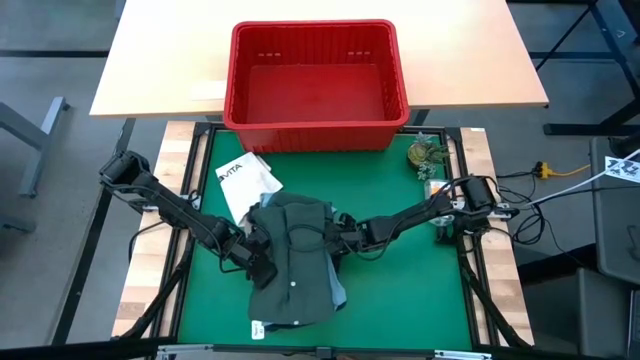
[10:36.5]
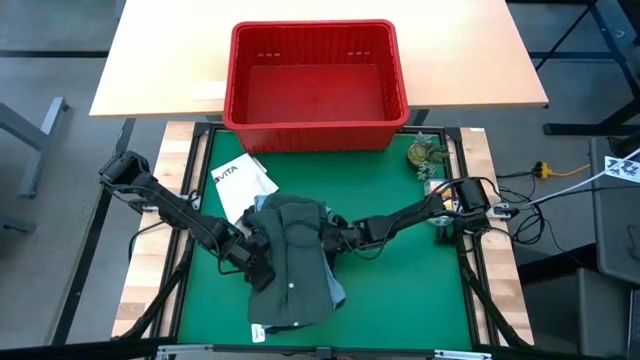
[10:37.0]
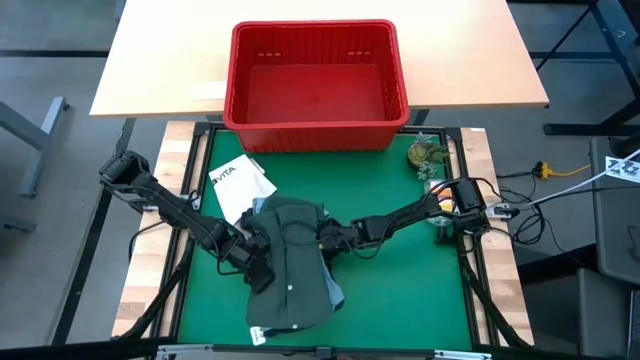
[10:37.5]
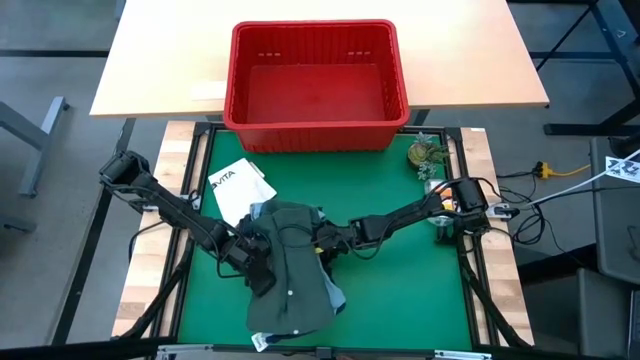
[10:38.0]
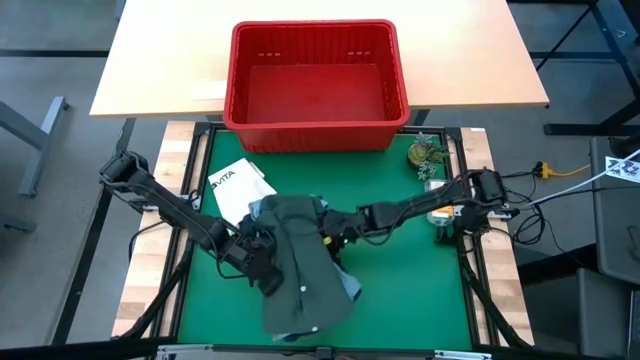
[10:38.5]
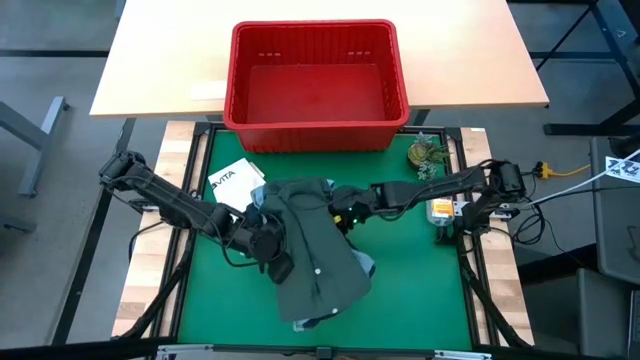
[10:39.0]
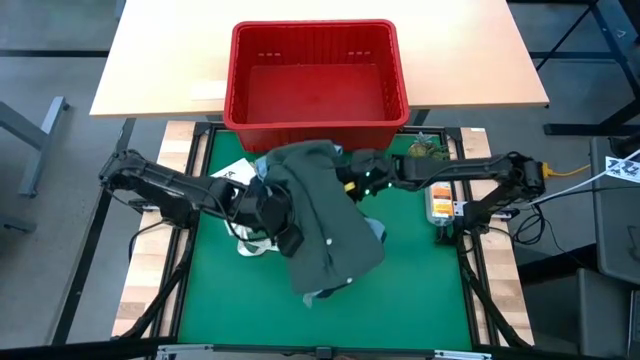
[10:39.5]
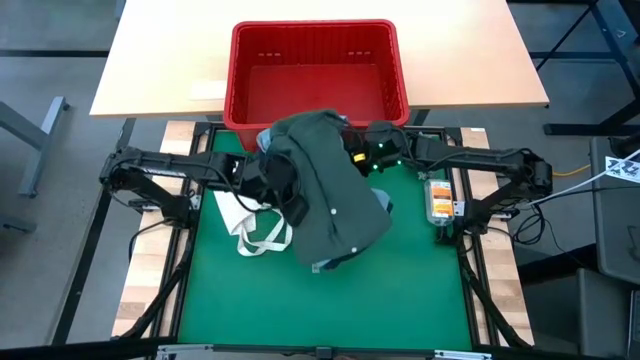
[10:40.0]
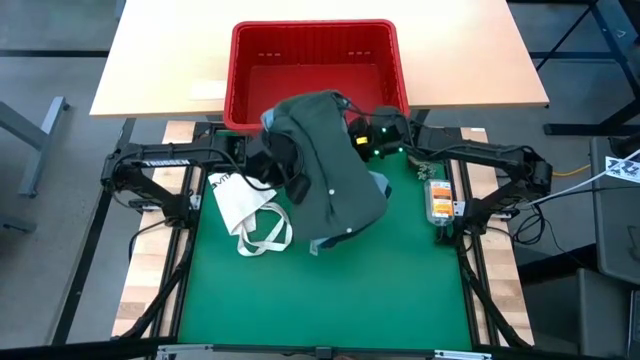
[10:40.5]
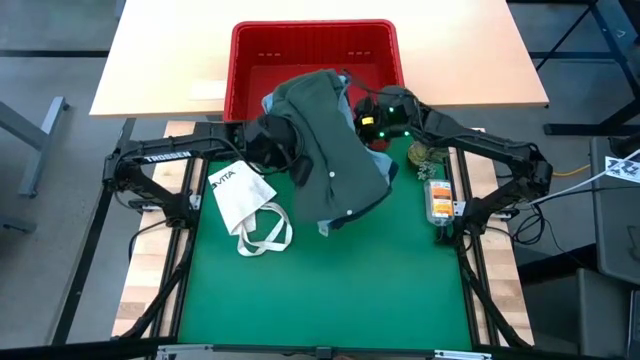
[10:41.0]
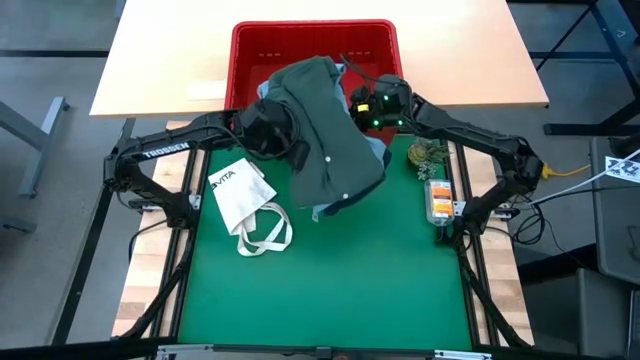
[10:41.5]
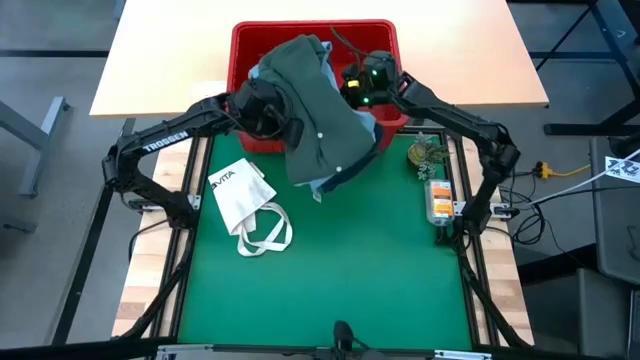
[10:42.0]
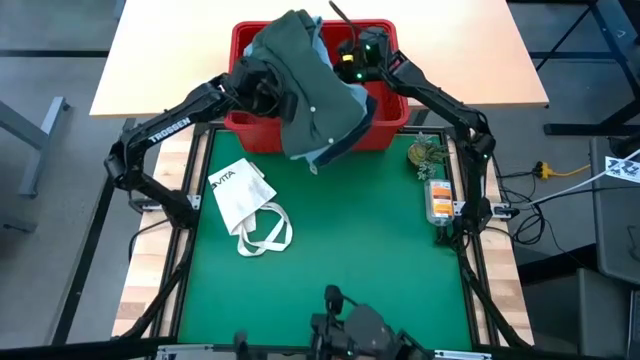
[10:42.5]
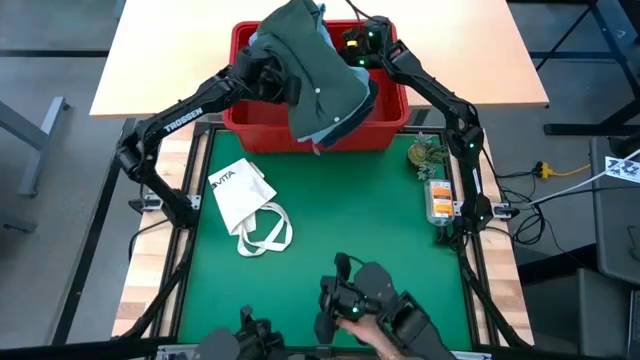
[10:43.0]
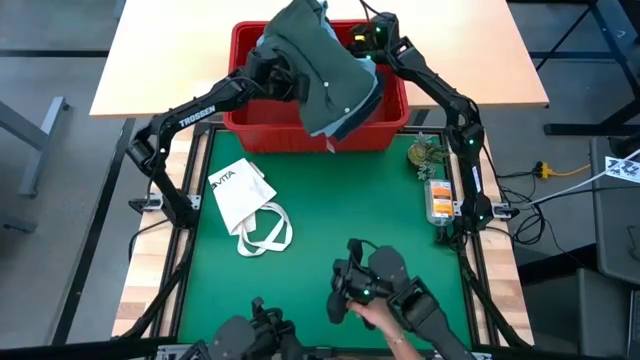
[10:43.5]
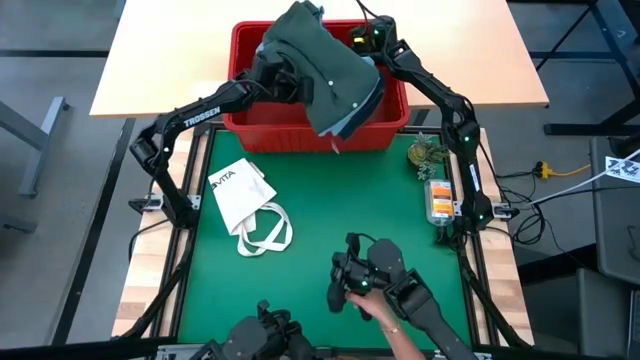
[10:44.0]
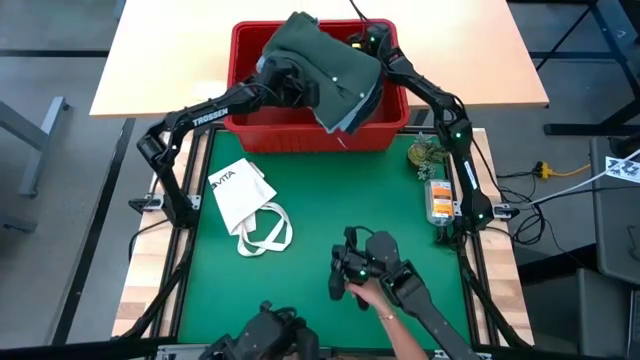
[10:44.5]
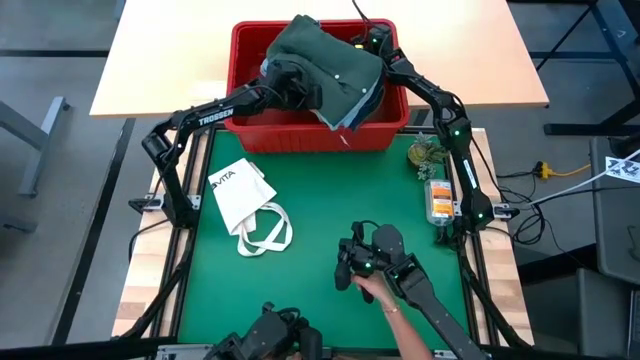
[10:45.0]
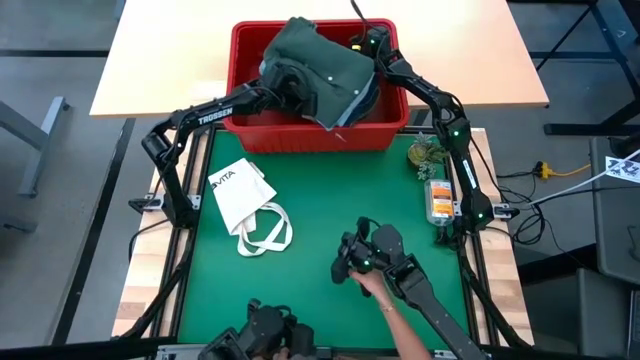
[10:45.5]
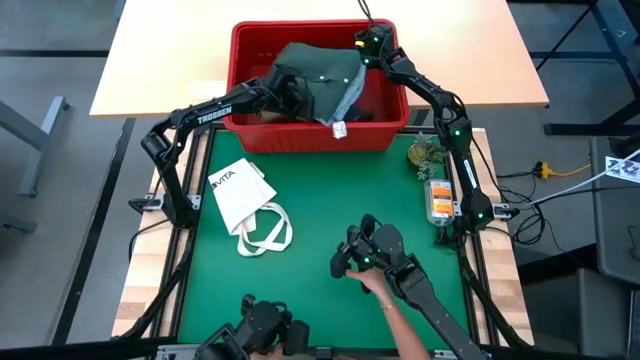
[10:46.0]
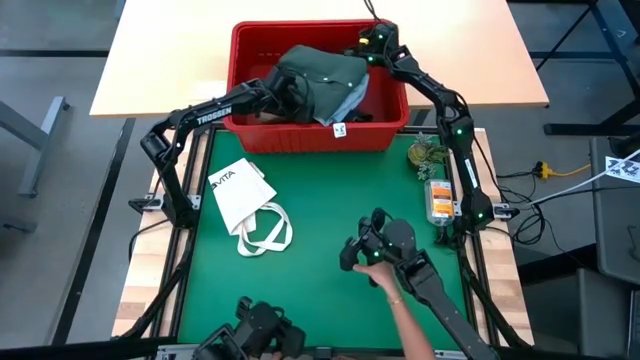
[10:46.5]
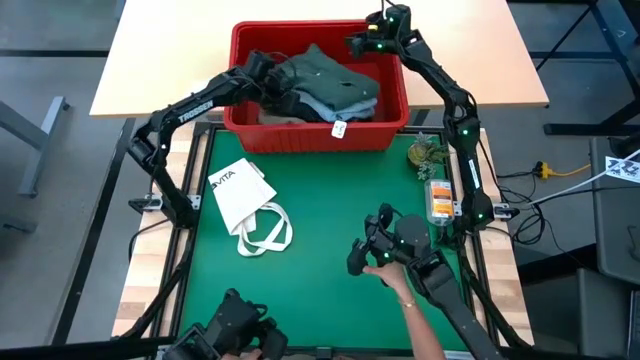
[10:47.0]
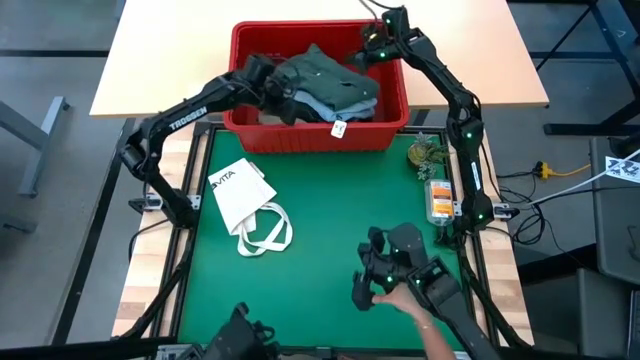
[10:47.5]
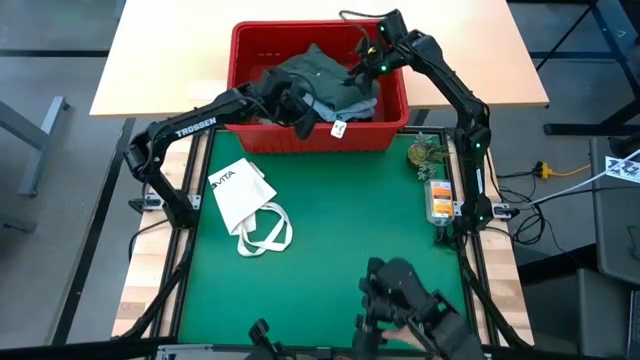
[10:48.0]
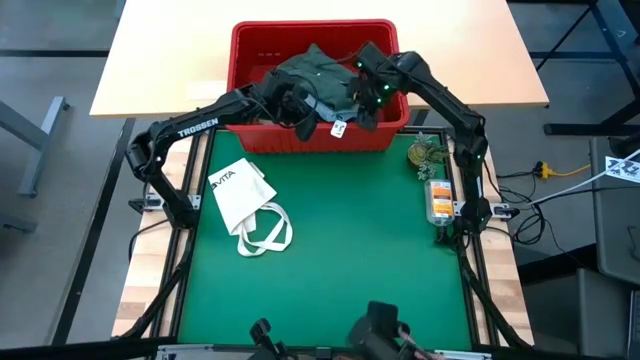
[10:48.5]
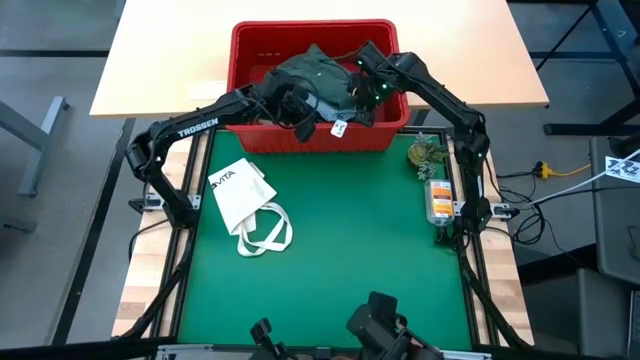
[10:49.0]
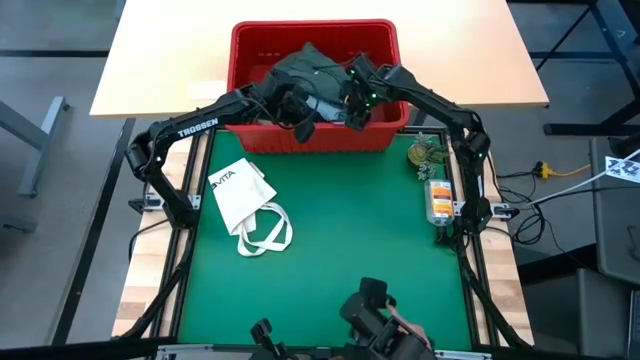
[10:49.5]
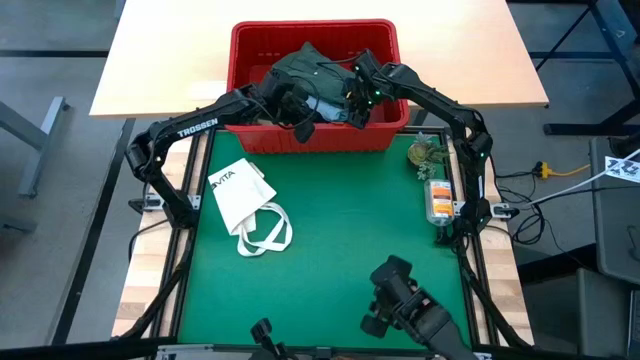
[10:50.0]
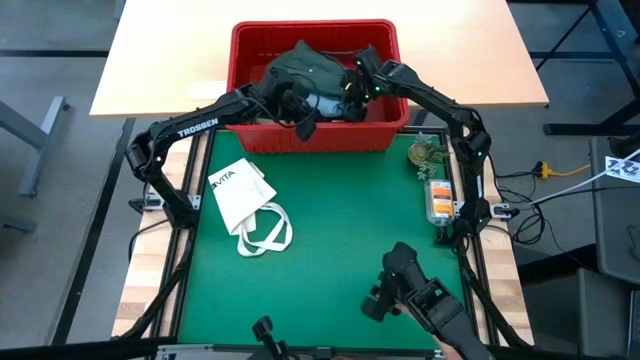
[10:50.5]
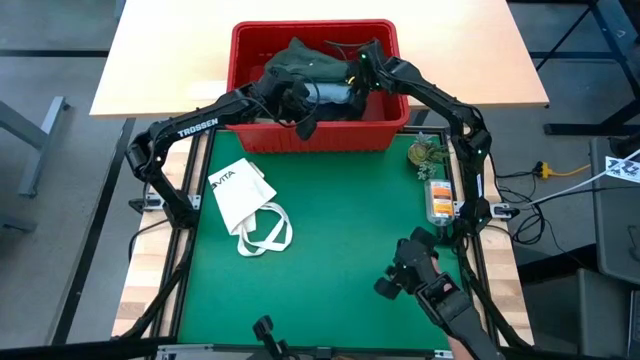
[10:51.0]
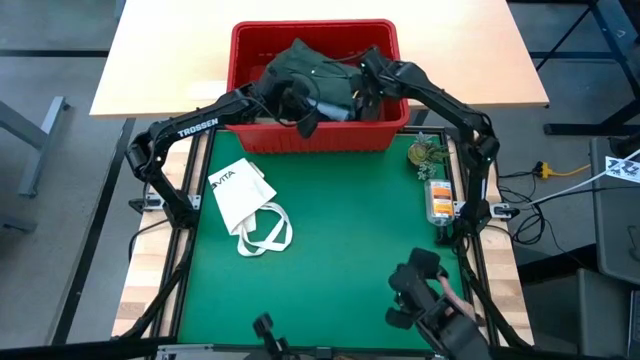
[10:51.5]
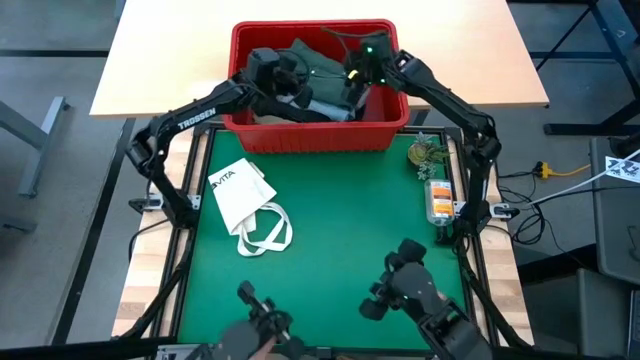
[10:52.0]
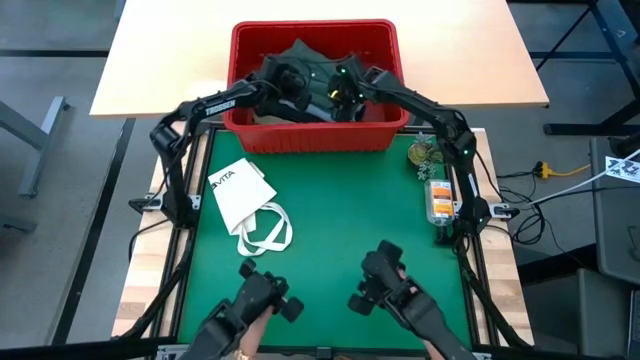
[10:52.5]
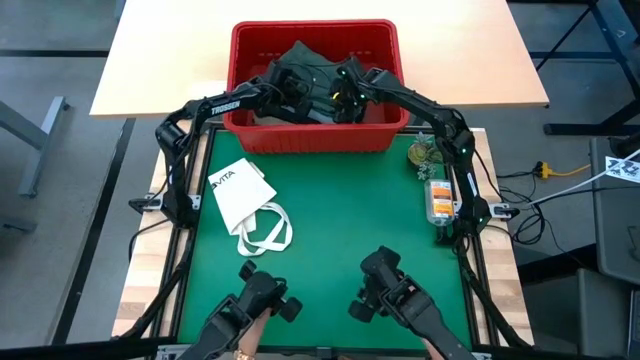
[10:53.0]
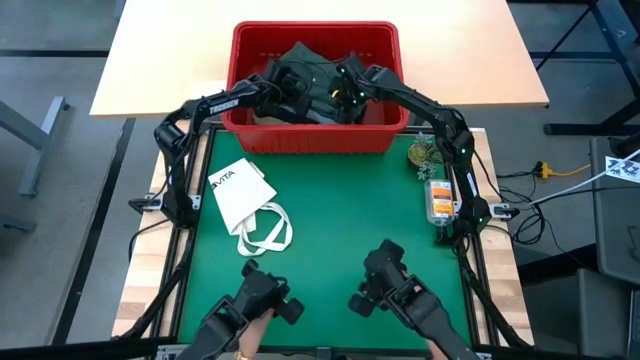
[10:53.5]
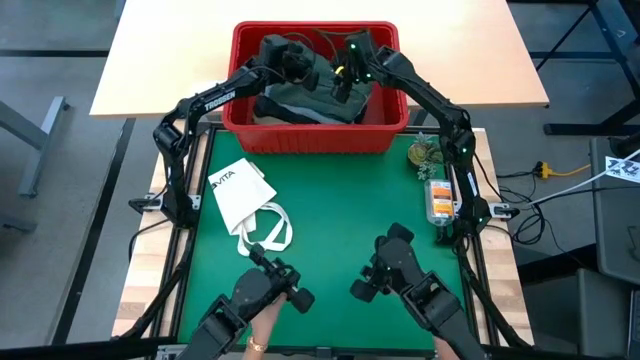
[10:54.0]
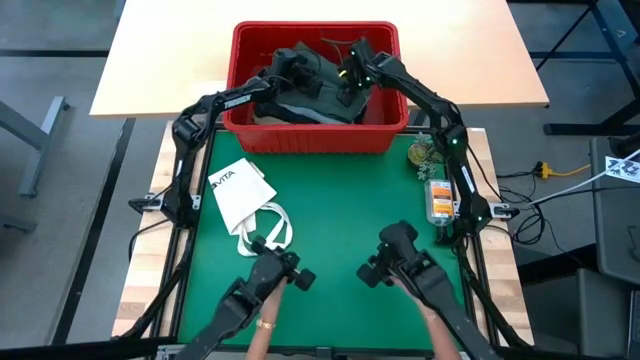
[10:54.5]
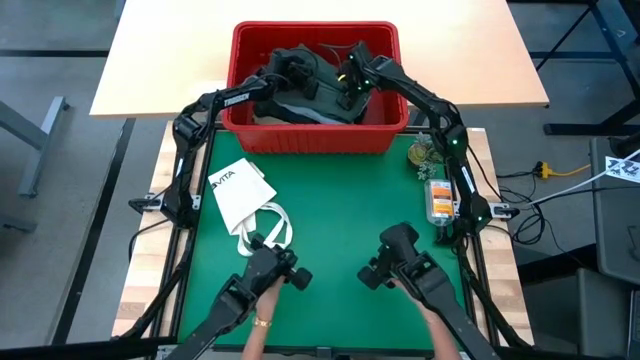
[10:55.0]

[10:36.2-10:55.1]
Task: Fold Laundry from Bin
Put the stacked clothing into the organizer bin
